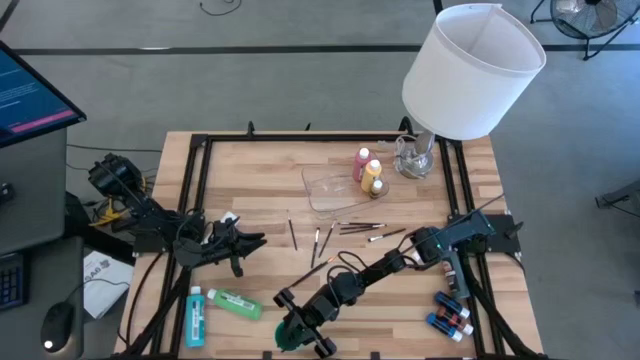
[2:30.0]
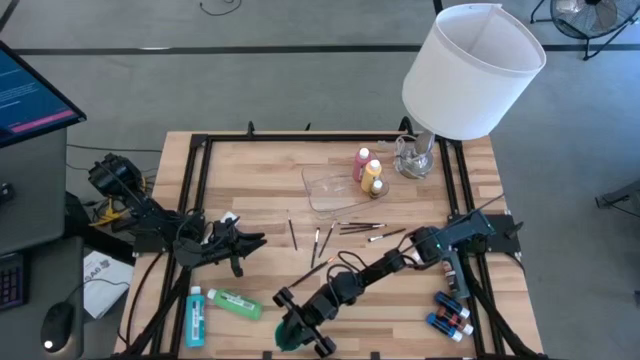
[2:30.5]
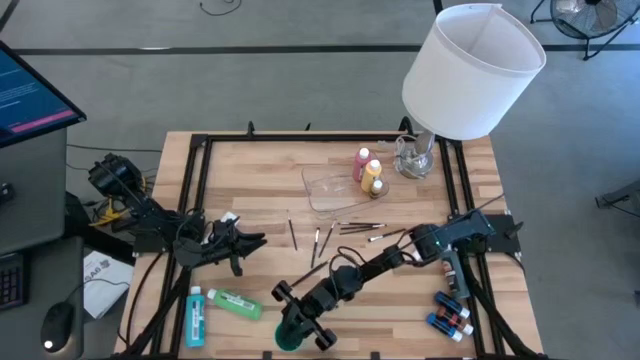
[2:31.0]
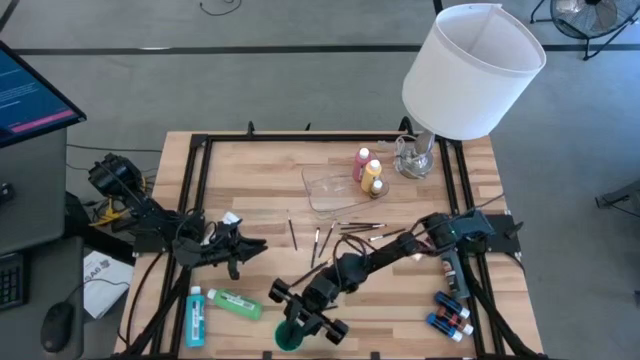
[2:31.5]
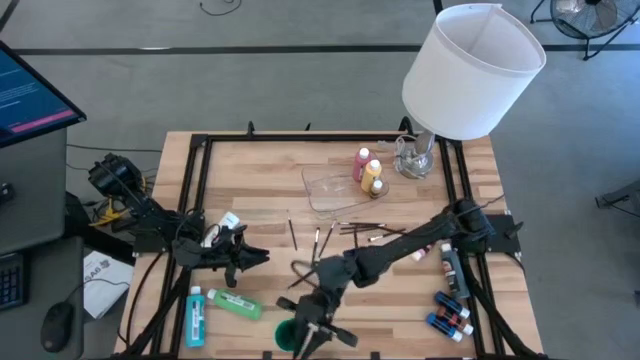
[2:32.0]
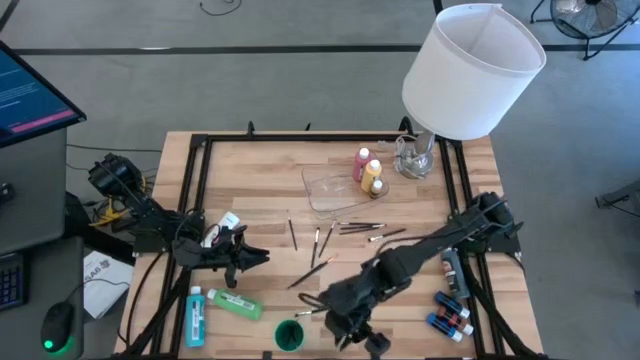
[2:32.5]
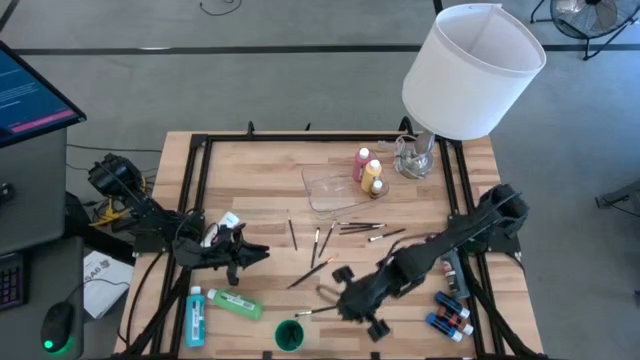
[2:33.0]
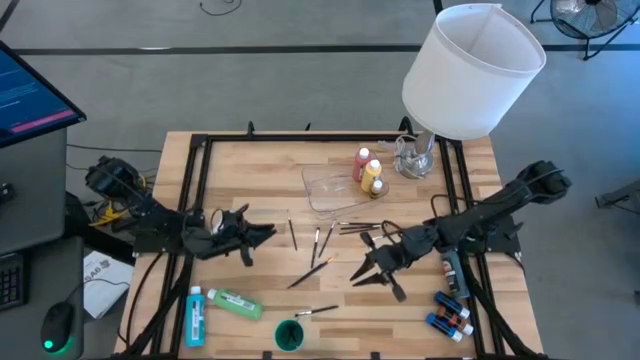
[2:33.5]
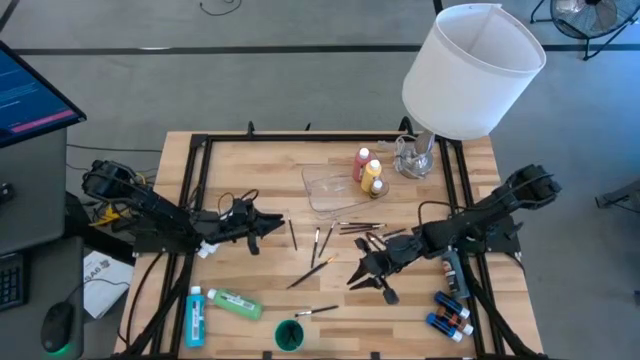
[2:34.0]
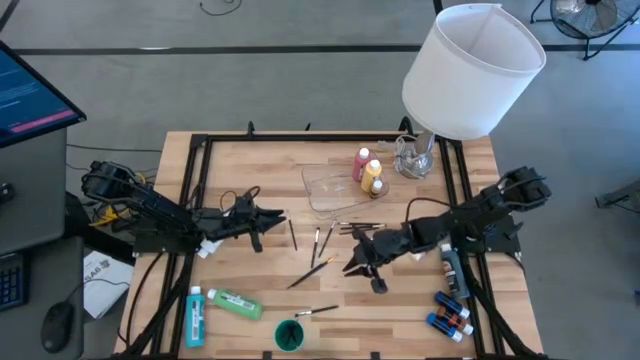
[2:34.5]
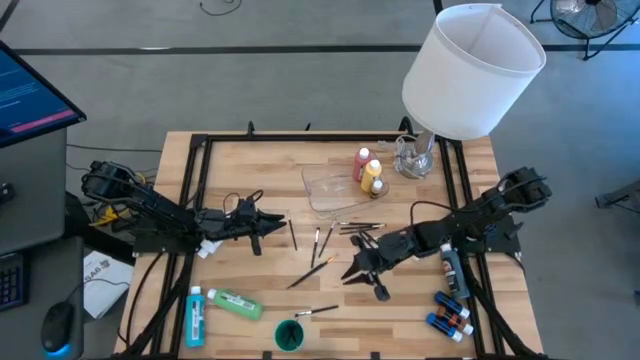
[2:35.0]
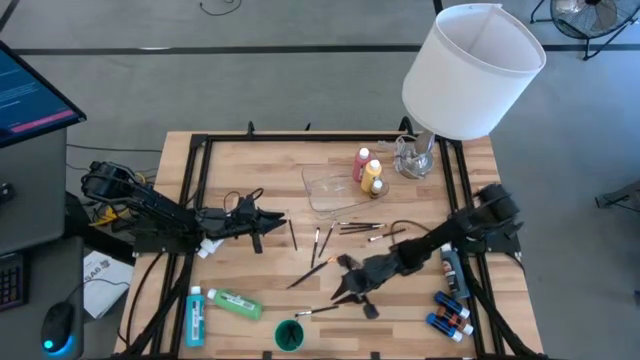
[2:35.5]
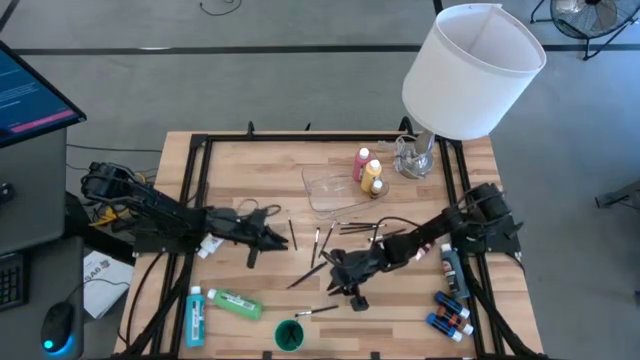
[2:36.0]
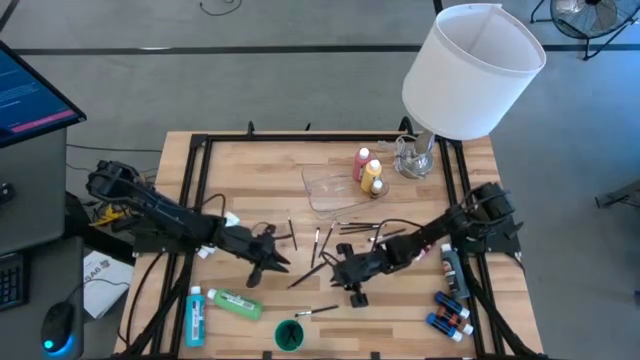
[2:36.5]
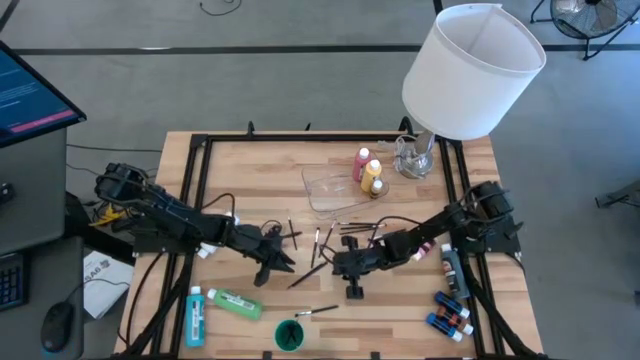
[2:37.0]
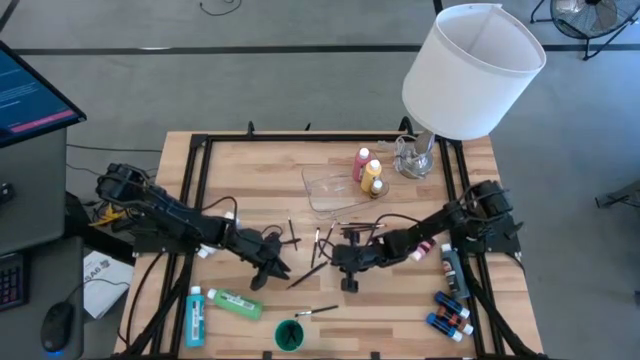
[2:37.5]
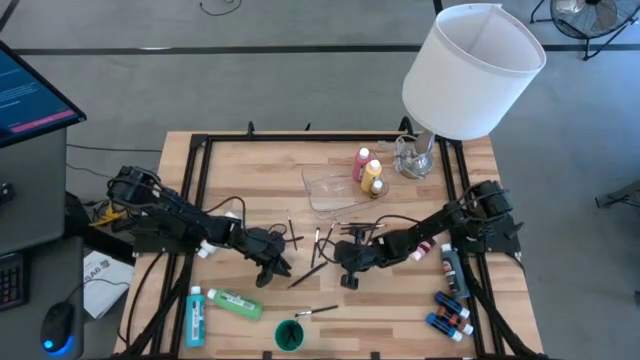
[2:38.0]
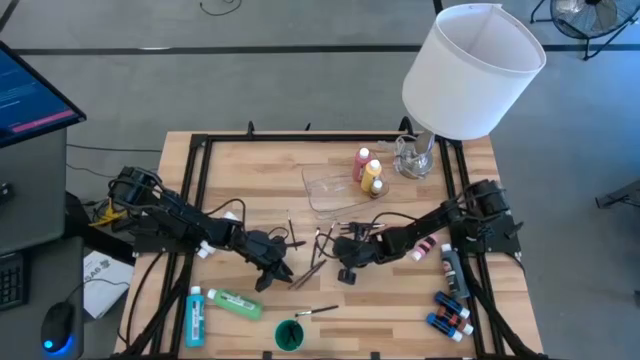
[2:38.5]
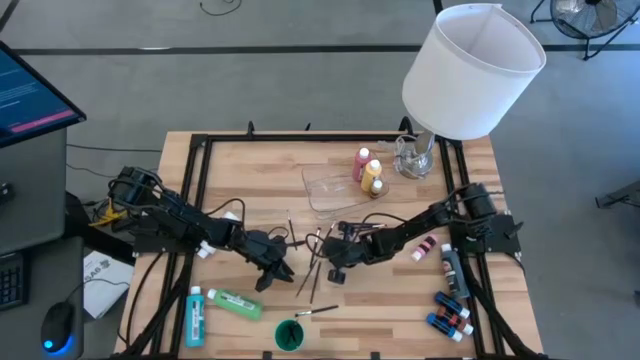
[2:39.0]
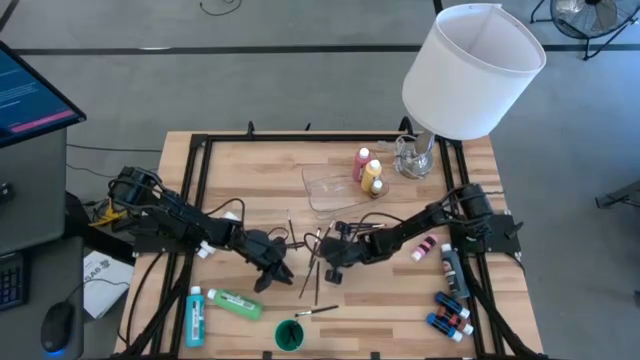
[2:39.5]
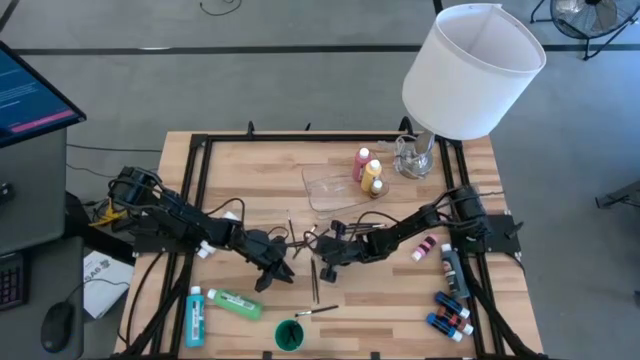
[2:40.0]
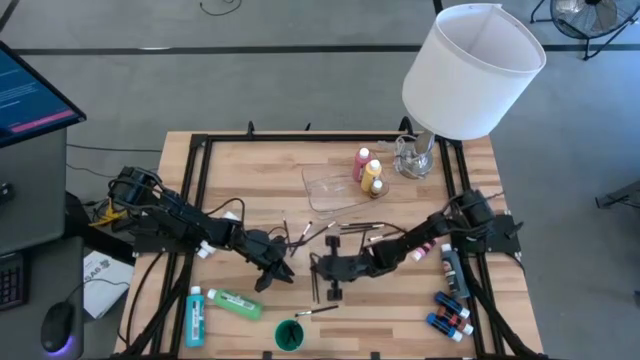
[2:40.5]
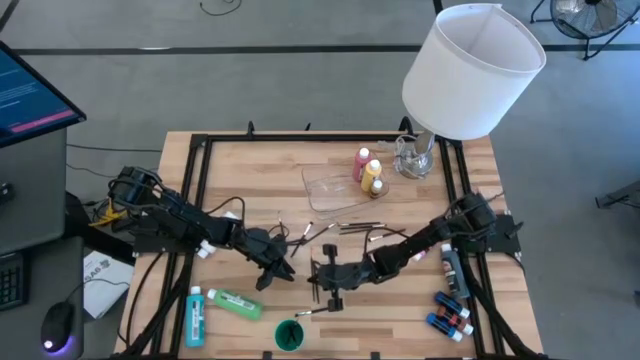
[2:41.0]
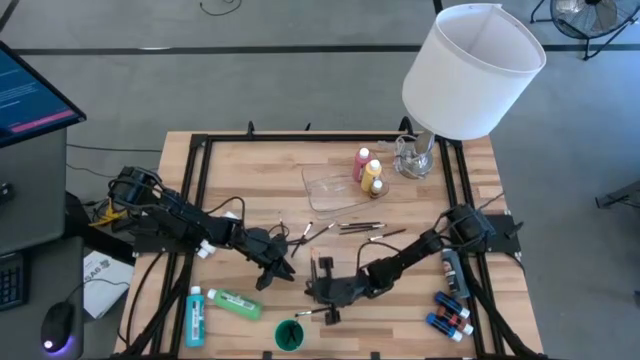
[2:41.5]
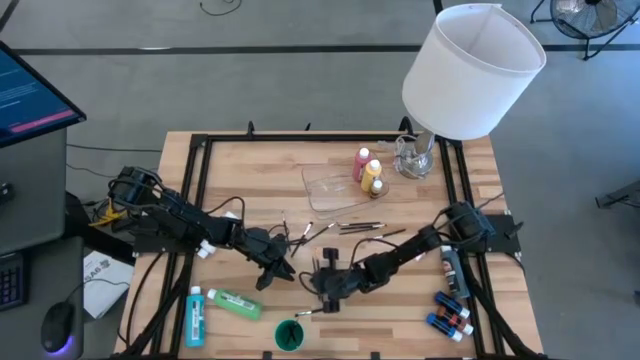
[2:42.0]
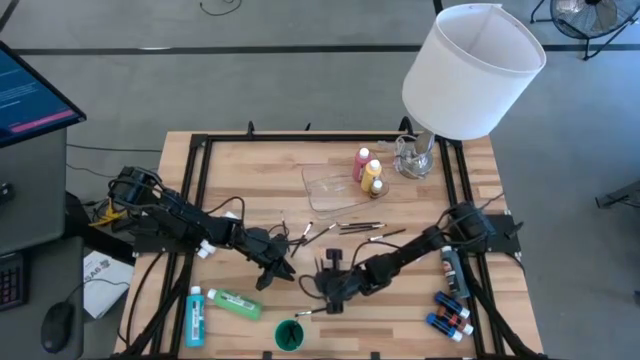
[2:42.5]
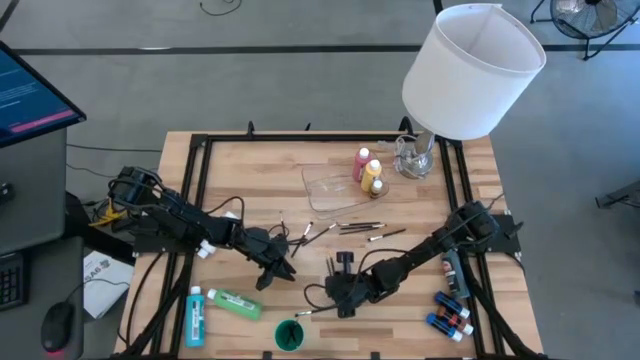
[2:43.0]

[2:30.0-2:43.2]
Task: Pick & Place Paint Supplies
Put the gold paintbrush into the green cup
